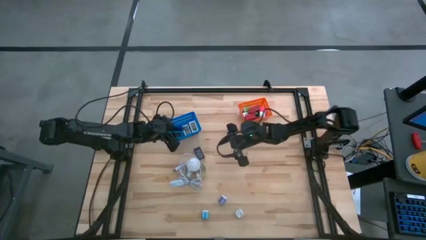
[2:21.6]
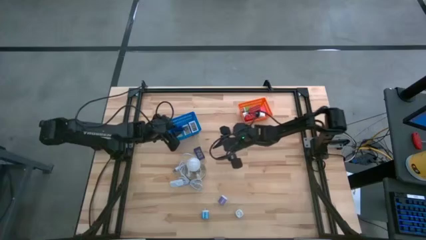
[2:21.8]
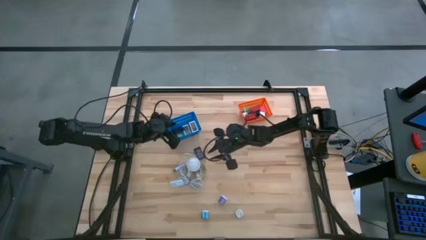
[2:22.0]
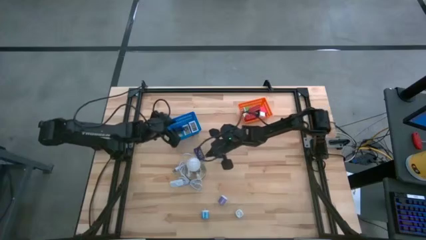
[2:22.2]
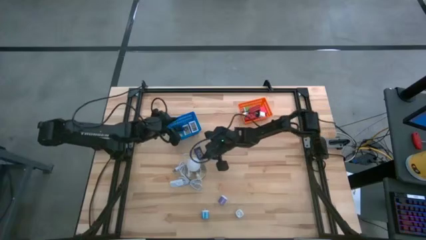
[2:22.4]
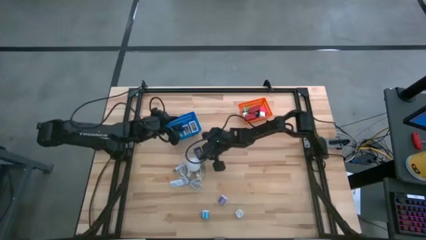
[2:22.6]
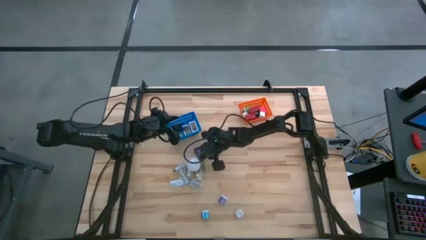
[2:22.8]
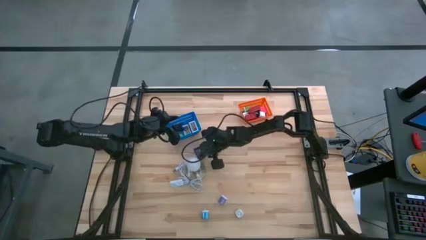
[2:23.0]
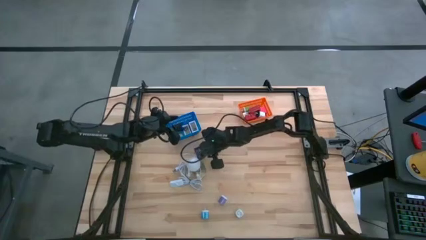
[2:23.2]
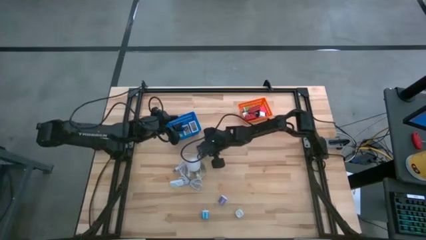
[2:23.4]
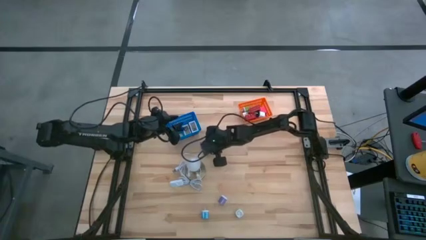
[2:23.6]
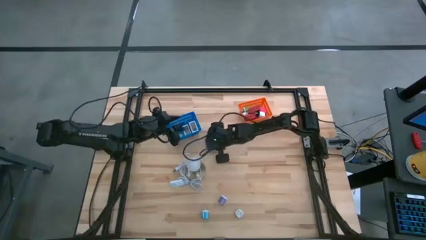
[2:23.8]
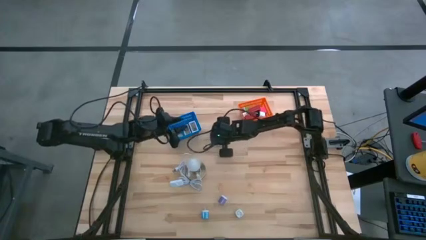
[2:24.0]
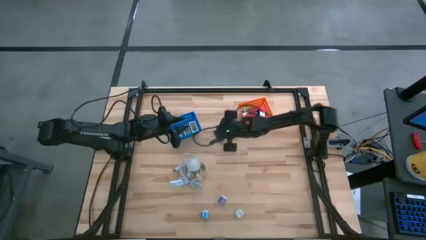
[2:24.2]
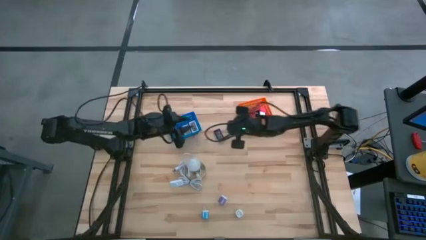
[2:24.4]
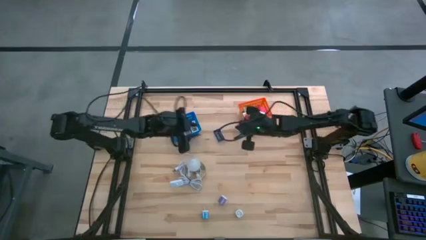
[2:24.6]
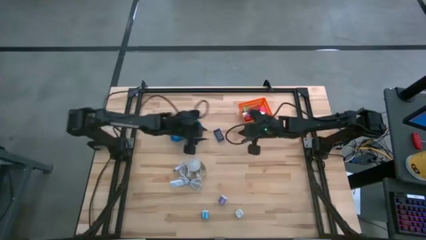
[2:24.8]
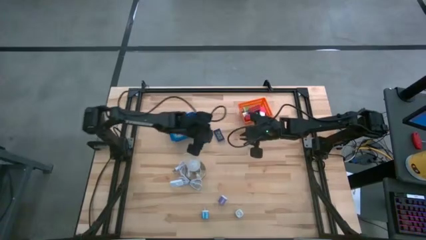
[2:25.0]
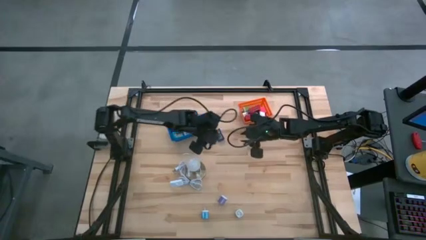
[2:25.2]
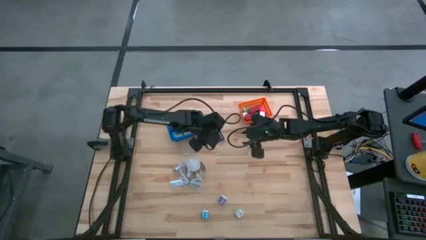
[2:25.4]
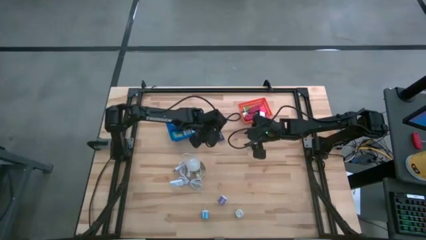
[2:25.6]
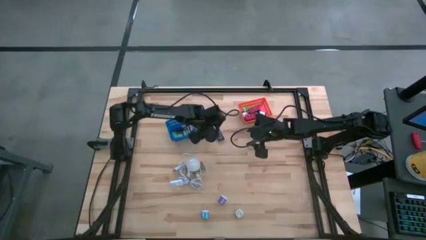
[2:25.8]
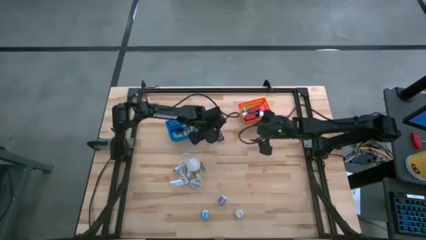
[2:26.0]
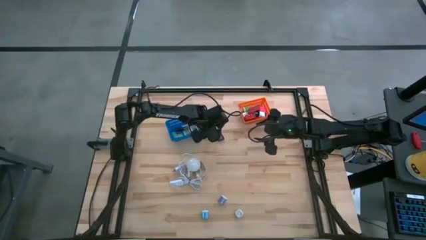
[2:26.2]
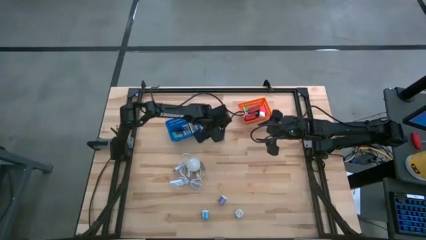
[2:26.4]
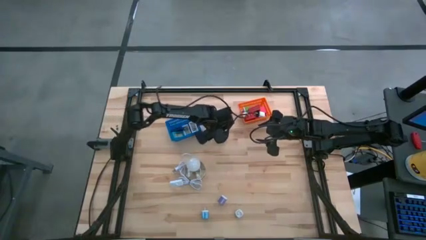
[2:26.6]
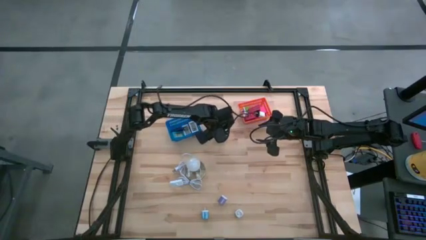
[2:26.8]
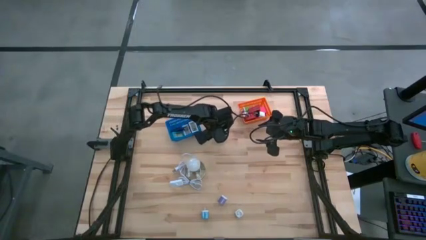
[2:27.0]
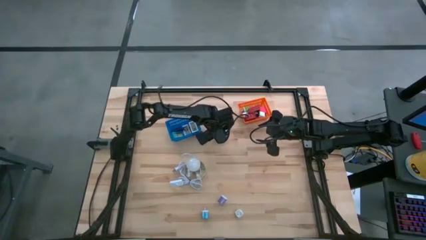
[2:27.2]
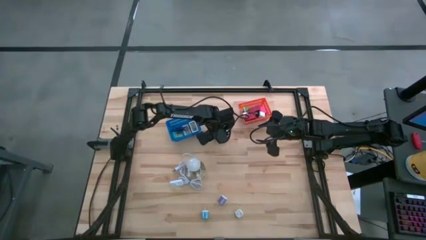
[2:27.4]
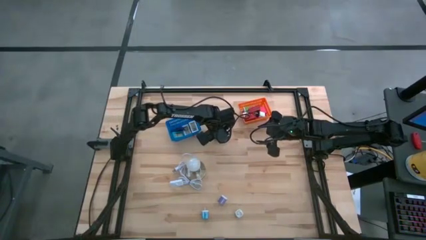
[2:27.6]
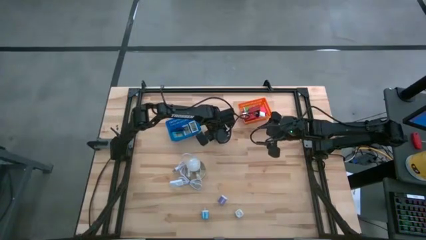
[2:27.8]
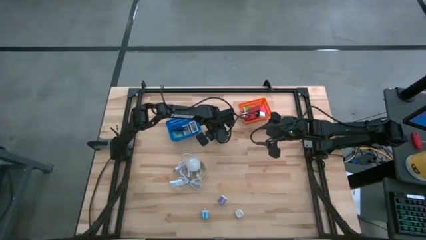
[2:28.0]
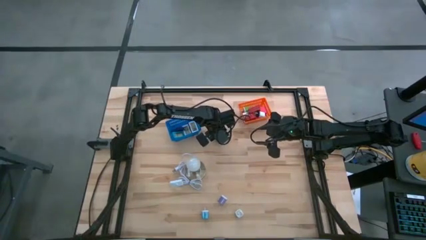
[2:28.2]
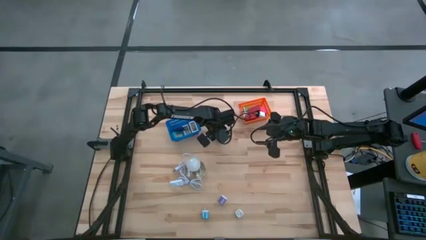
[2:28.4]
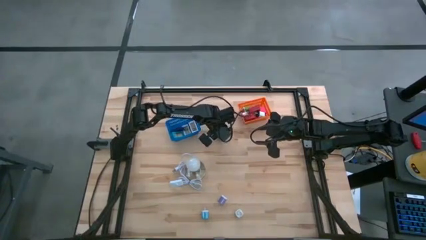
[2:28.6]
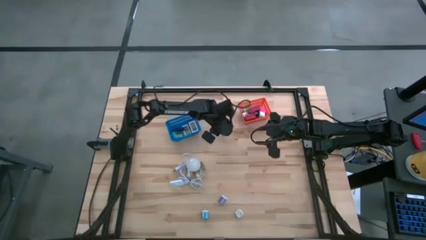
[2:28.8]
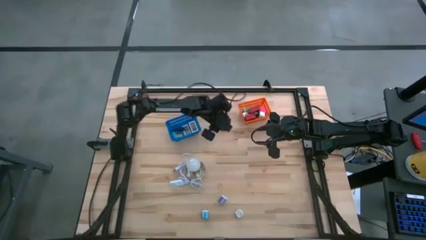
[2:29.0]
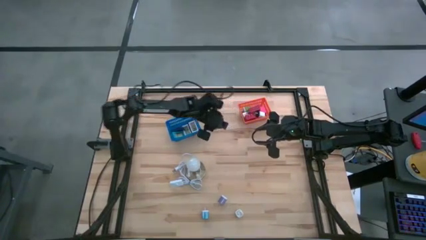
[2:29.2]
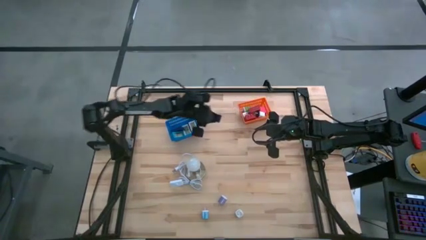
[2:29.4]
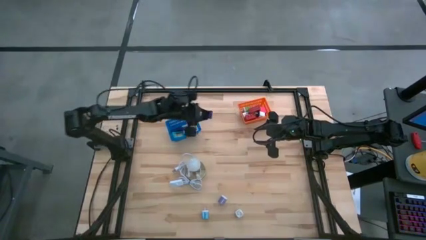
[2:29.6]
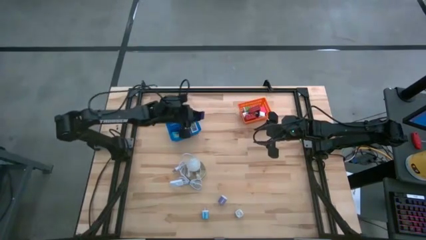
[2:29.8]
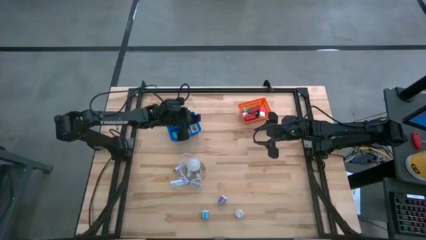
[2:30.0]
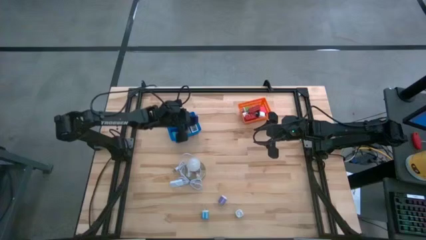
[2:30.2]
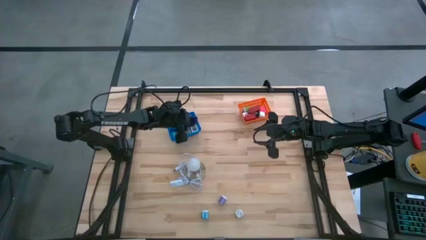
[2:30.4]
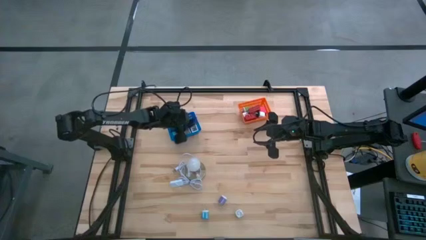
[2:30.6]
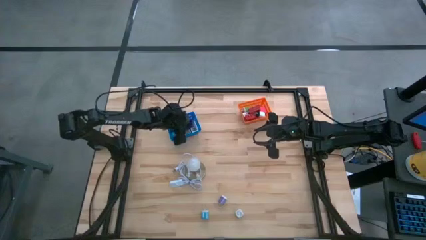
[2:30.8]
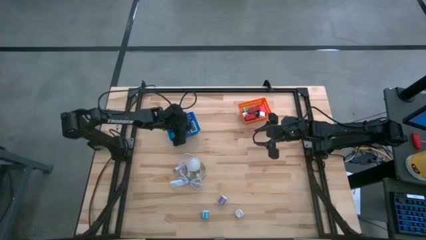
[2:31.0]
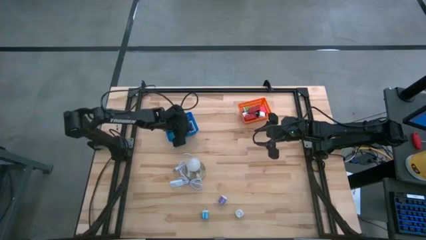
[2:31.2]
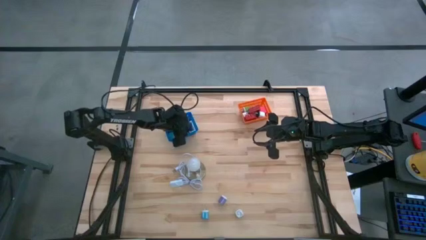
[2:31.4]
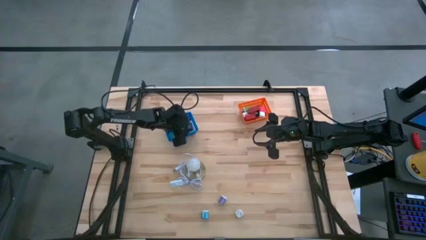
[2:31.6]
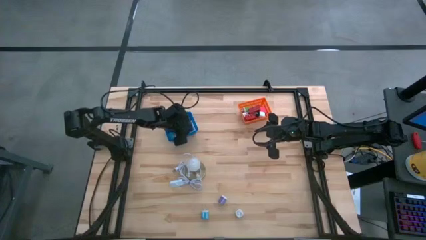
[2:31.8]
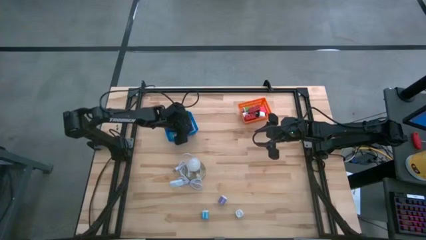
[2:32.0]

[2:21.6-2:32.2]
Task: Pick & Place Office items
Put the blue timer into the blue bin

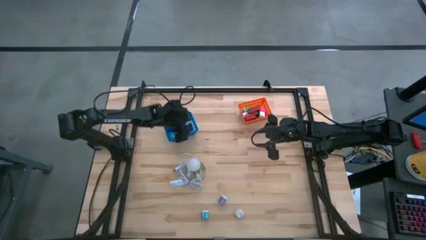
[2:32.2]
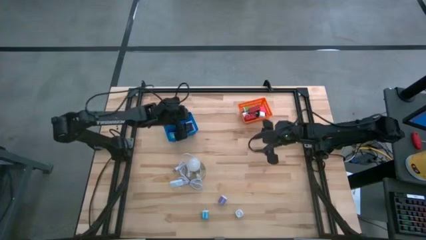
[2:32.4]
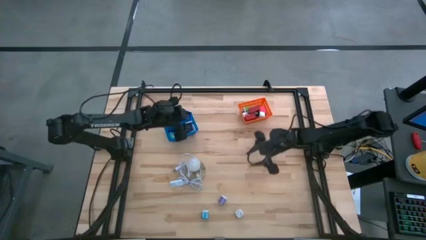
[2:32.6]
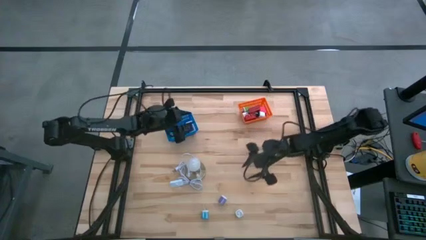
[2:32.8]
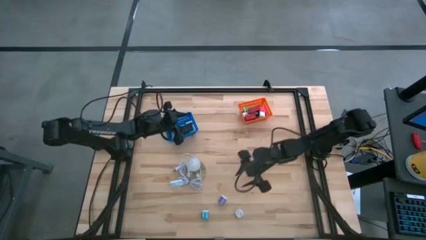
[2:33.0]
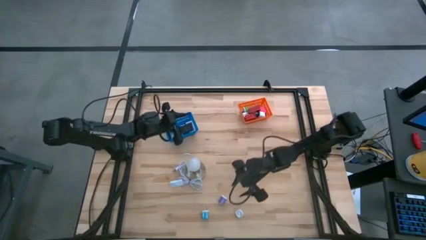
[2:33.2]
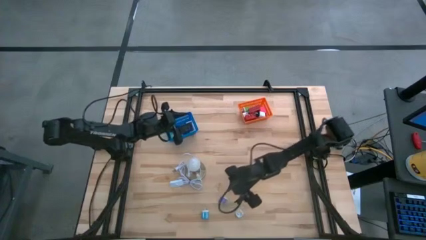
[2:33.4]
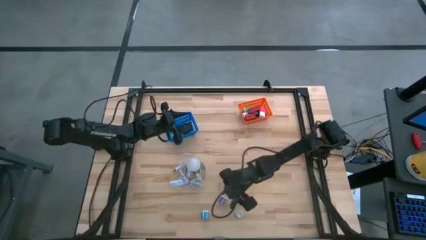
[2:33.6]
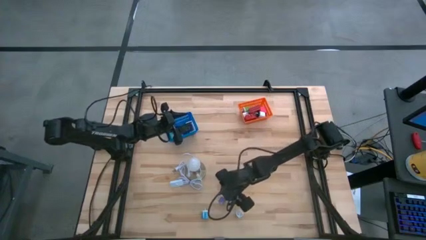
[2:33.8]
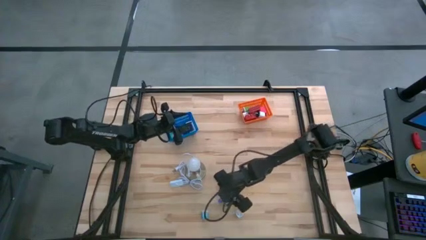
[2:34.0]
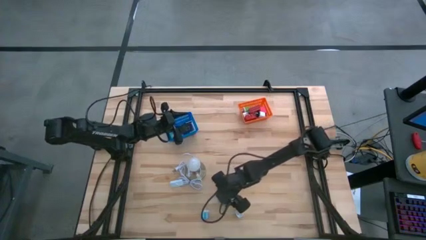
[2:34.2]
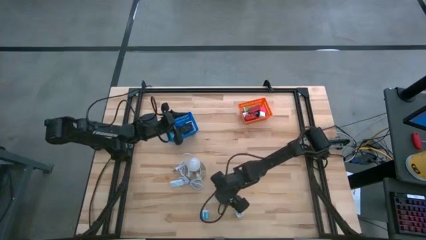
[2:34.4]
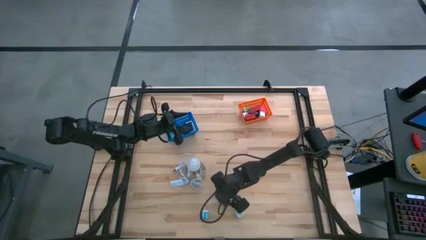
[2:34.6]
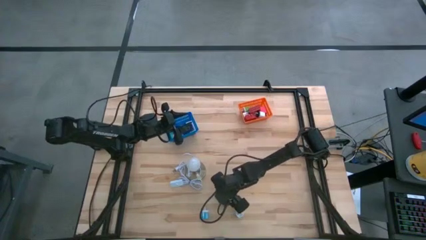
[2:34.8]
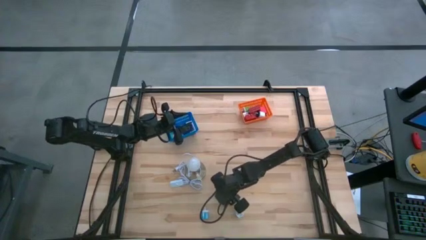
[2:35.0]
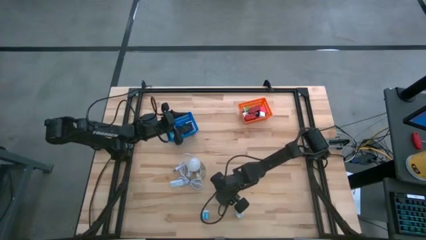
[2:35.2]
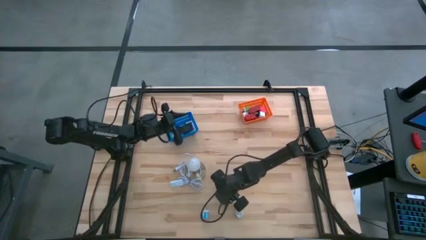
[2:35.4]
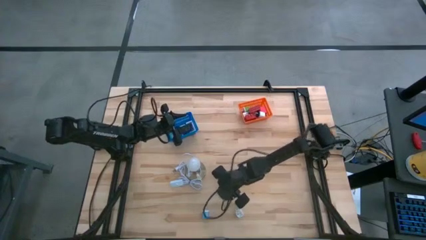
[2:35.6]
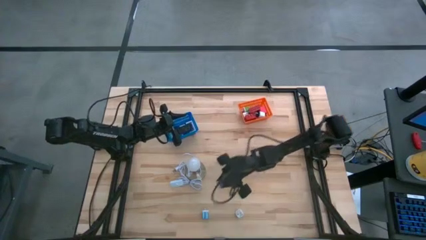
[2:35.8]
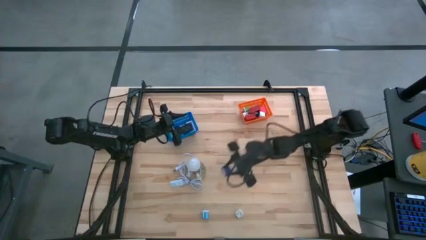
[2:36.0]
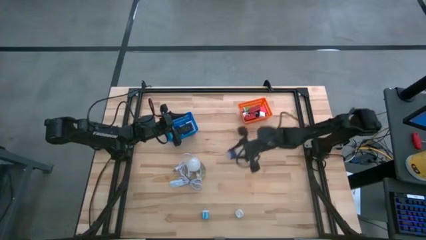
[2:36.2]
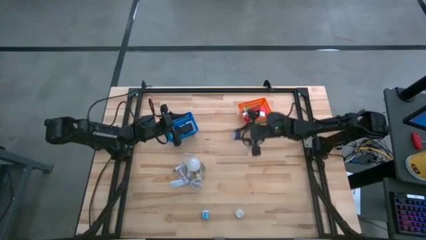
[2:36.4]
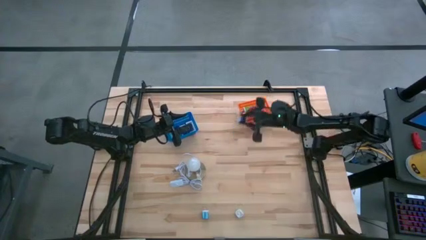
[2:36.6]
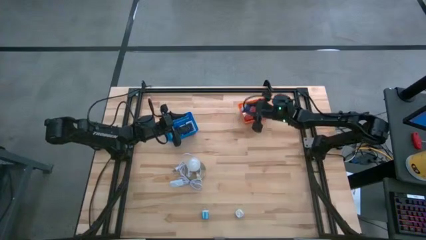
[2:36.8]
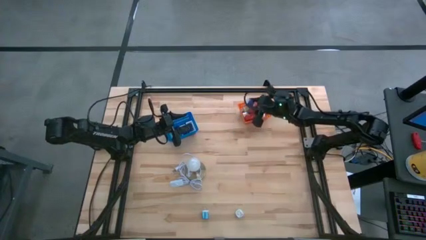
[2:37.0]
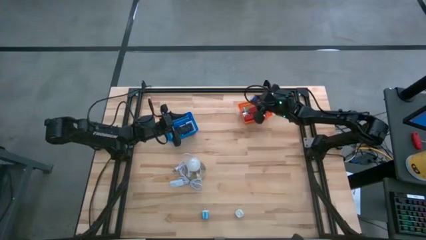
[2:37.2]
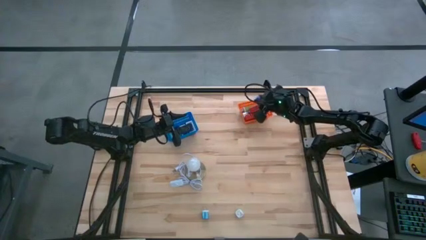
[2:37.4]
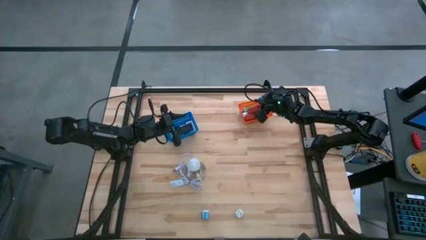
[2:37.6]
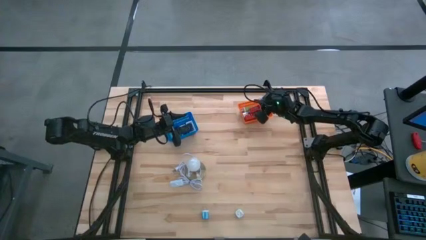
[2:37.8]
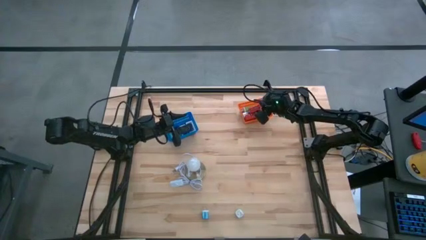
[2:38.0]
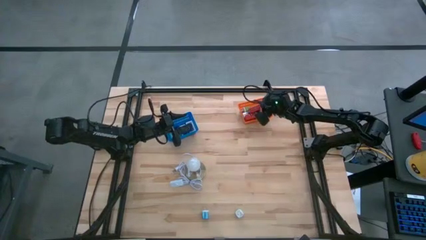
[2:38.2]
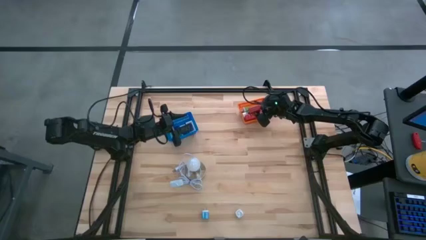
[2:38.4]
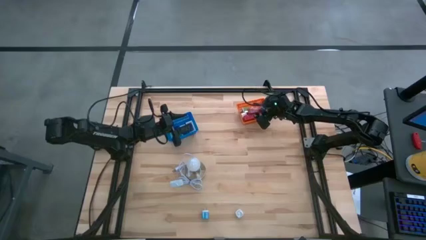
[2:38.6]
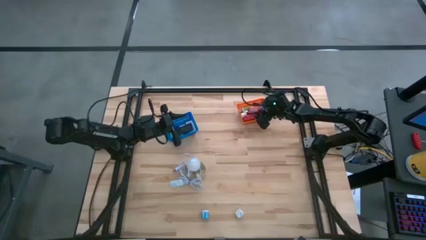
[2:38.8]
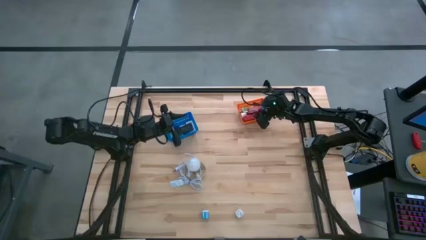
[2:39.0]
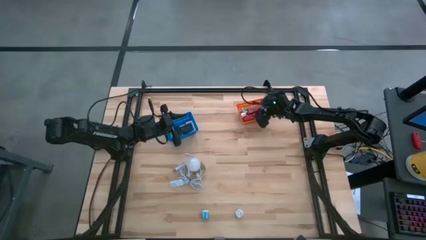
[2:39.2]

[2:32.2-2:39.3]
Put the violet charger adapter into the orange bin
